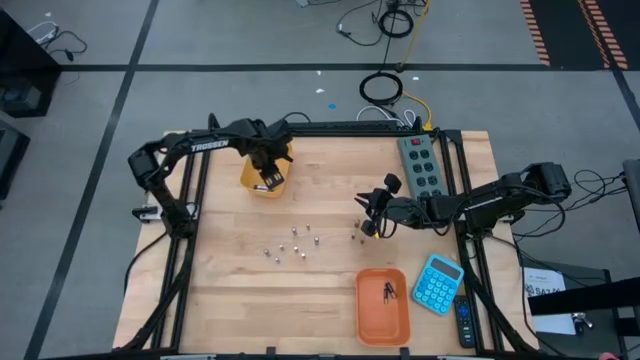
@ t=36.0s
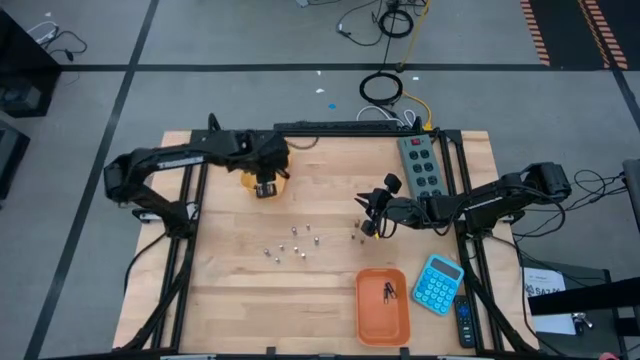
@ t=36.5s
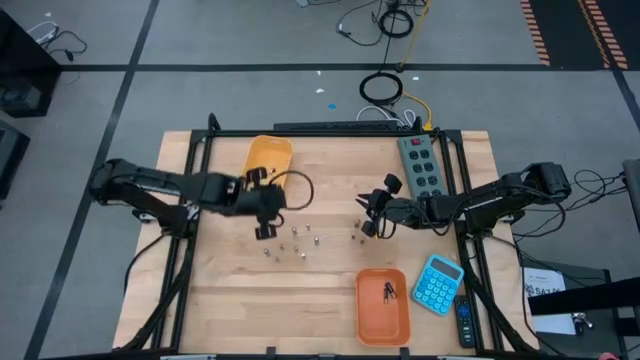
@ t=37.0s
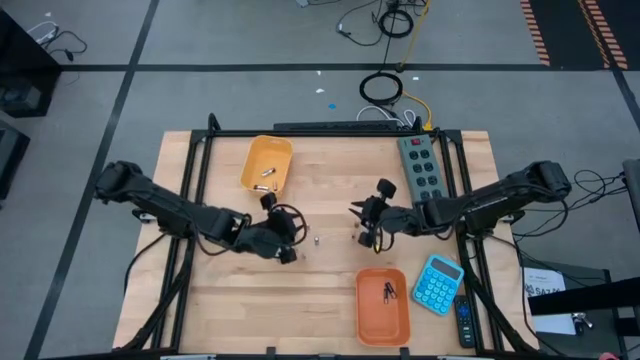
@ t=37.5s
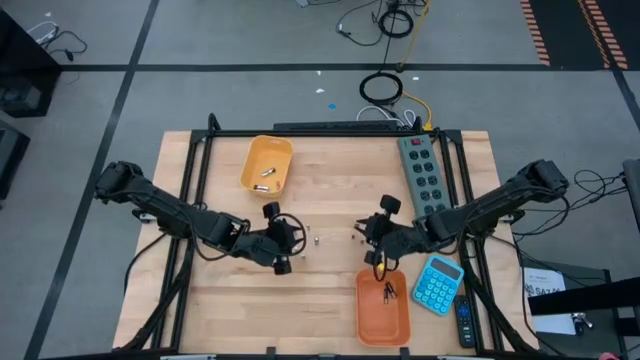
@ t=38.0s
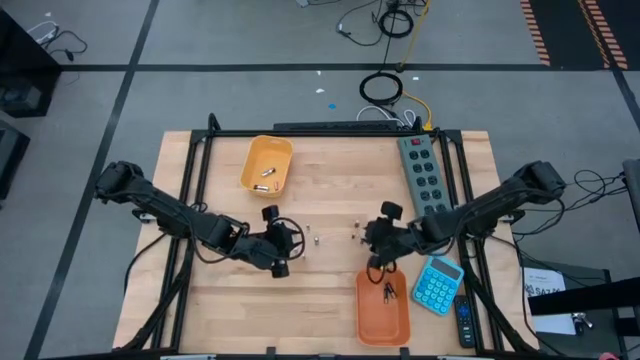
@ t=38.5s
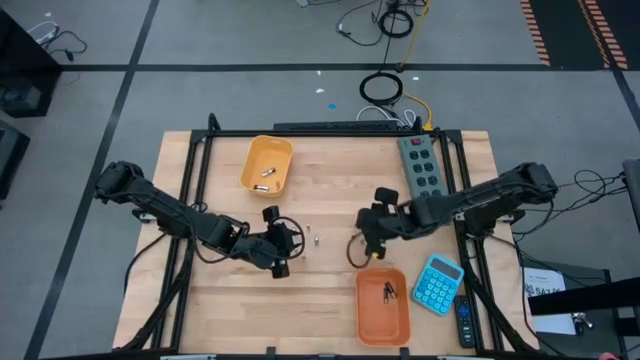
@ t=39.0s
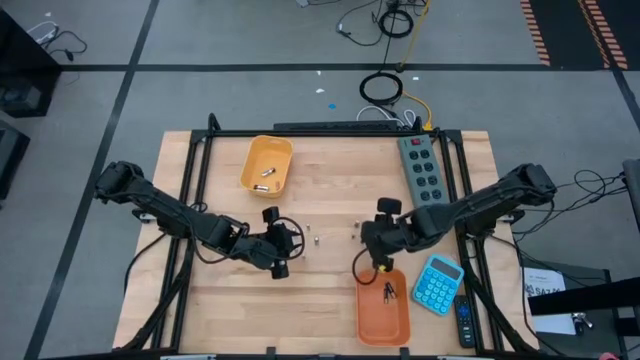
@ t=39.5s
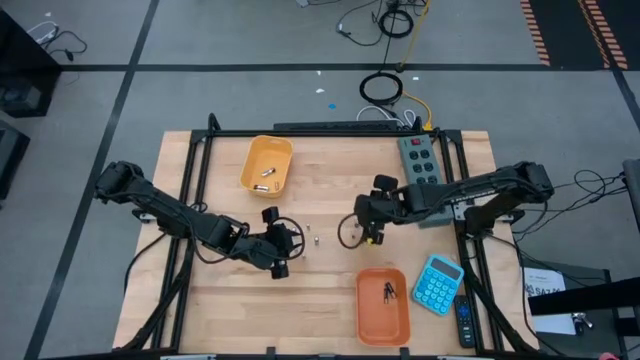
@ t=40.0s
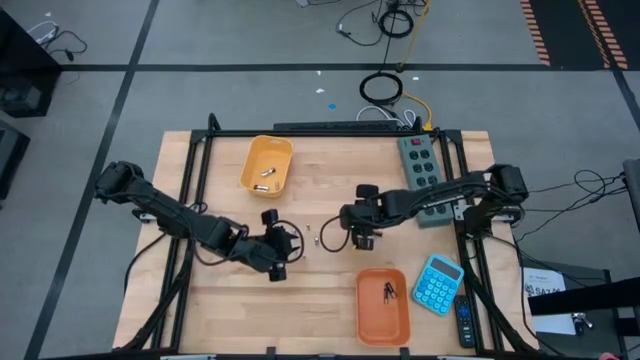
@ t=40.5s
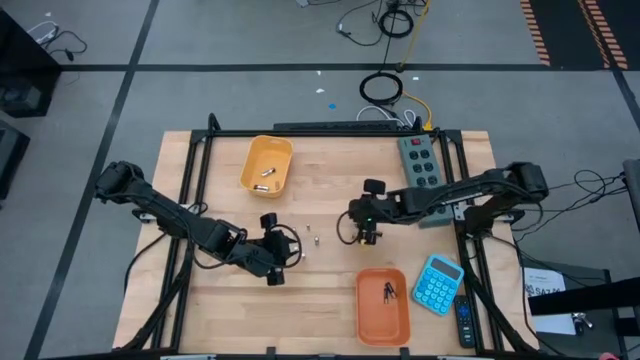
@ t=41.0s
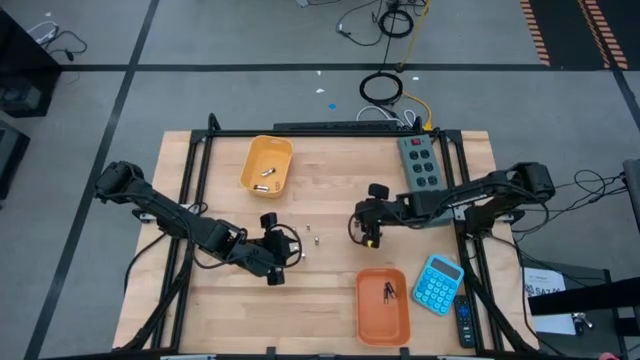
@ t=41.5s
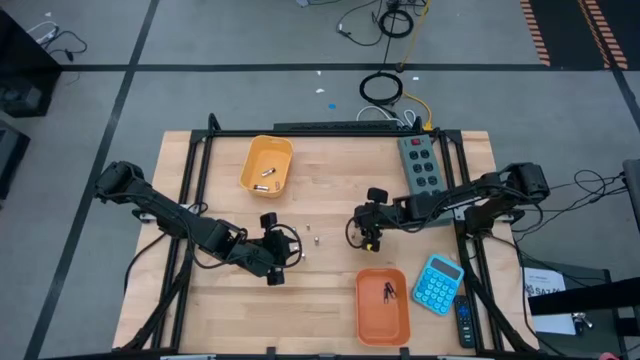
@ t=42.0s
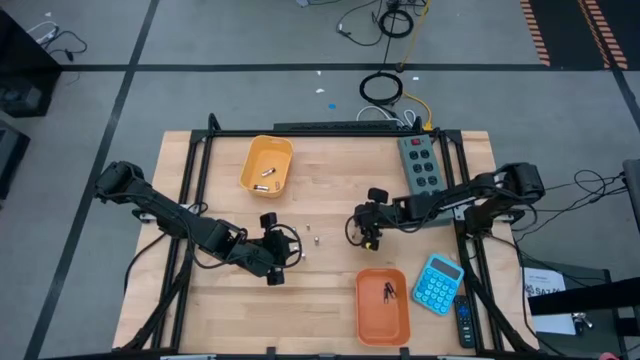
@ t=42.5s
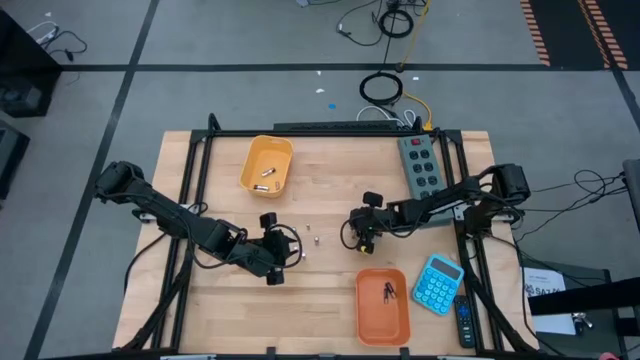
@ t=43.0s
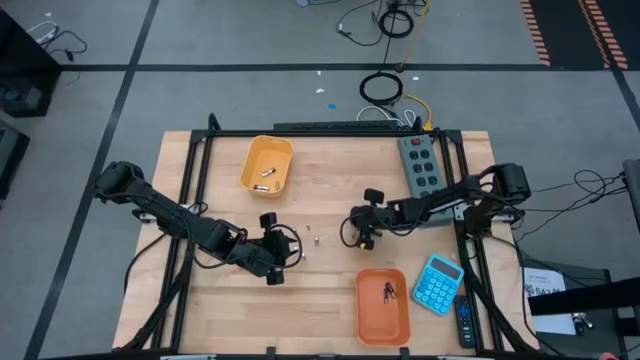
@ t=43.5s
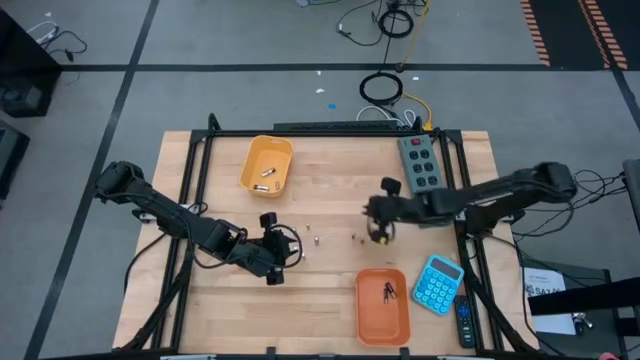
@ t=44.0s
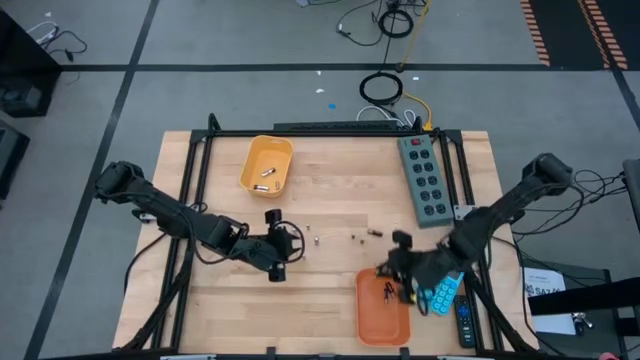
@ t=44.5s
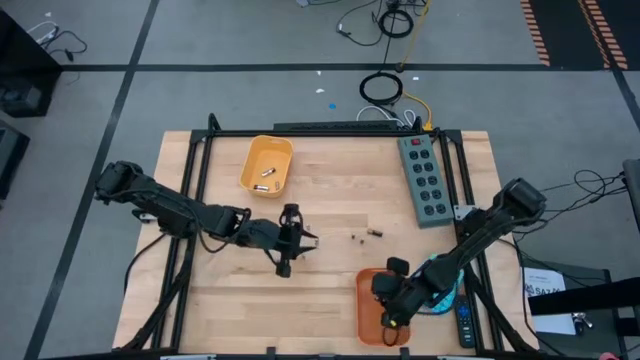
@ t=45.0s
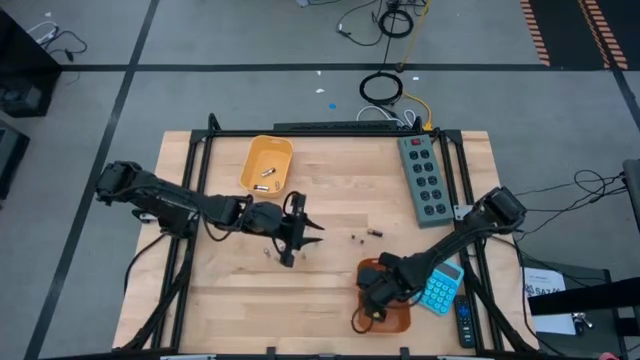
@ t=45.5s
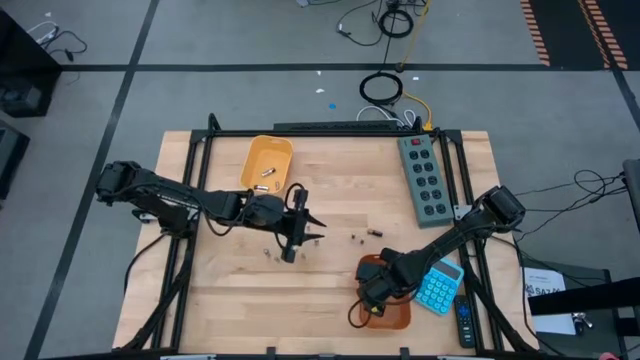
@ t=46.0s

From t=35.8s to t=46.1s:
Task: Sort batteries
Put the black battery into the orange bin

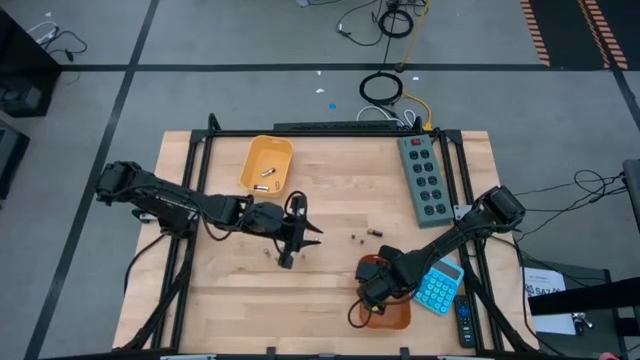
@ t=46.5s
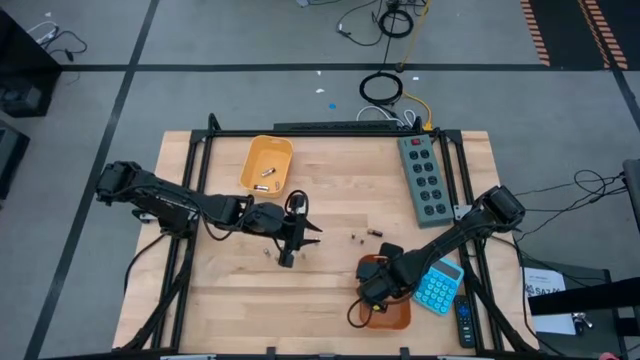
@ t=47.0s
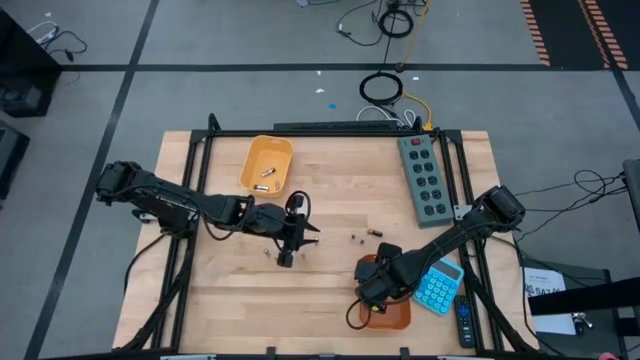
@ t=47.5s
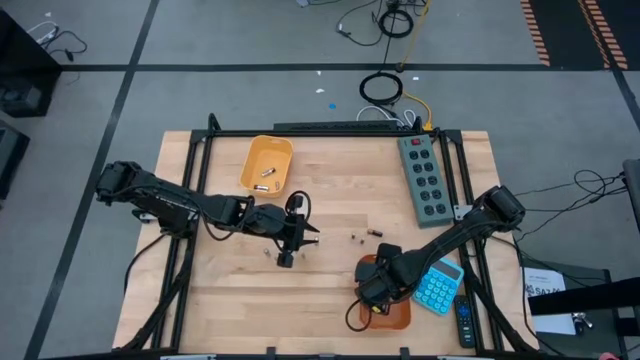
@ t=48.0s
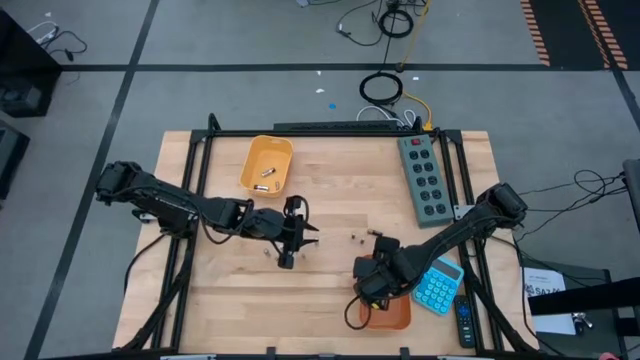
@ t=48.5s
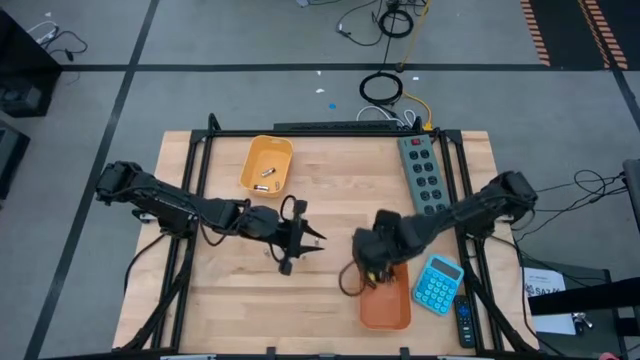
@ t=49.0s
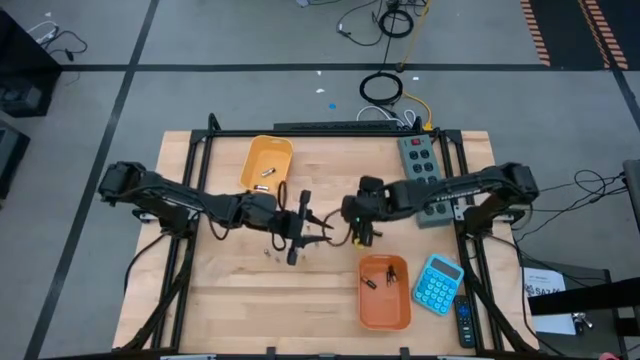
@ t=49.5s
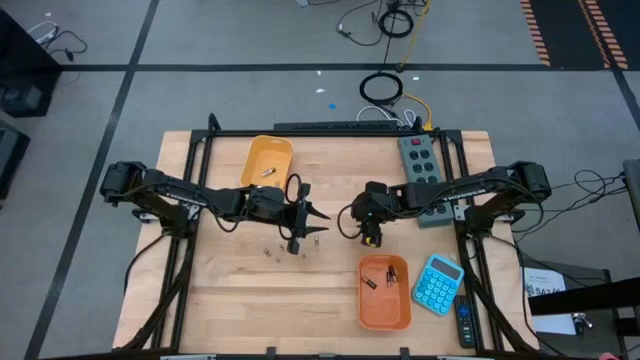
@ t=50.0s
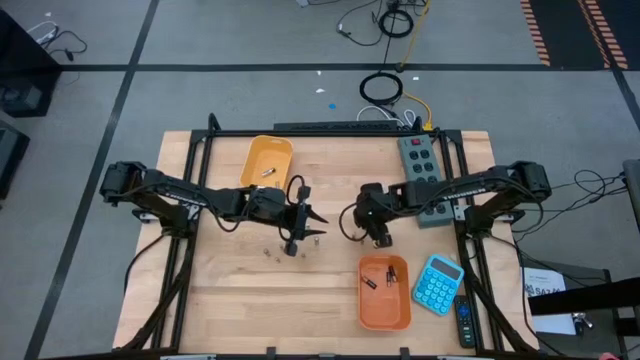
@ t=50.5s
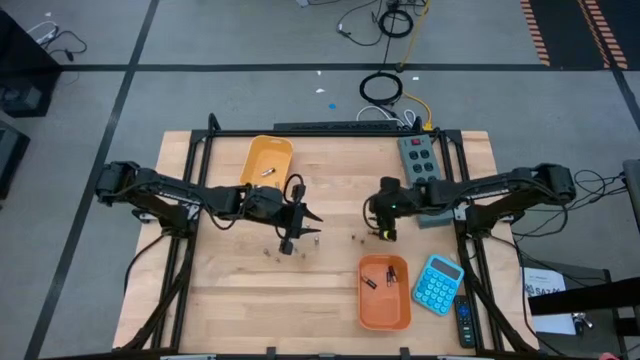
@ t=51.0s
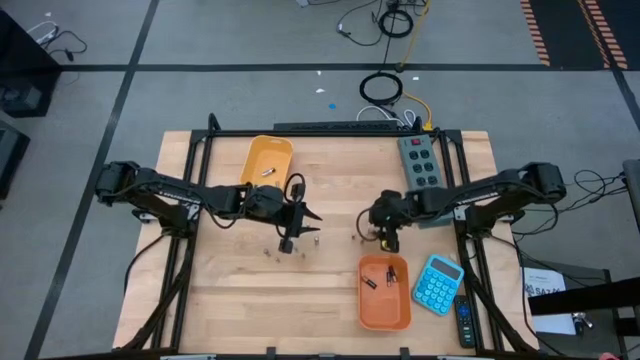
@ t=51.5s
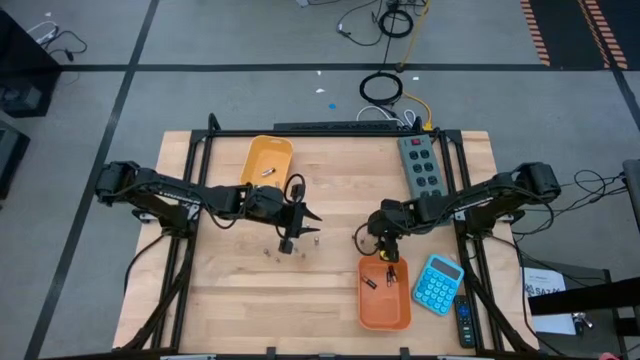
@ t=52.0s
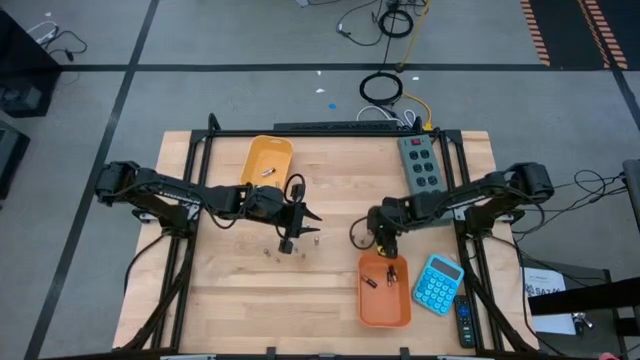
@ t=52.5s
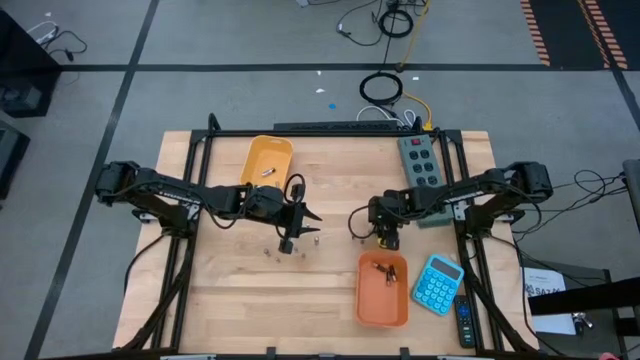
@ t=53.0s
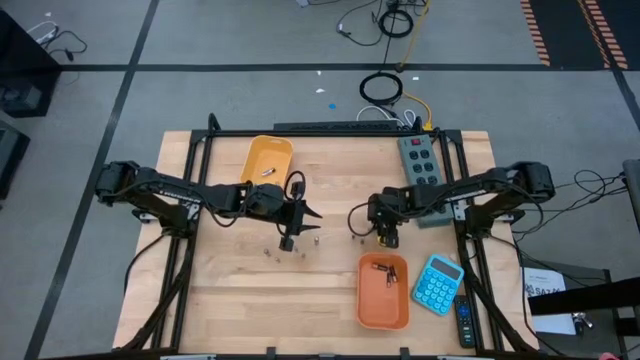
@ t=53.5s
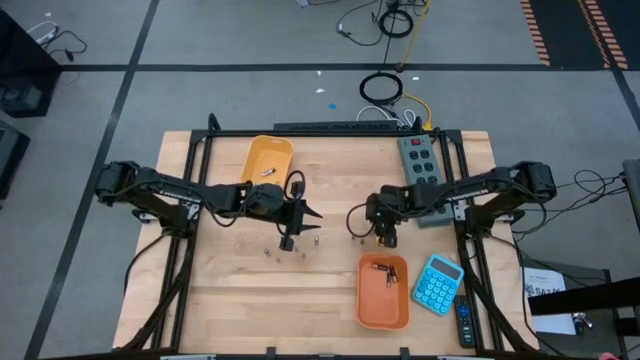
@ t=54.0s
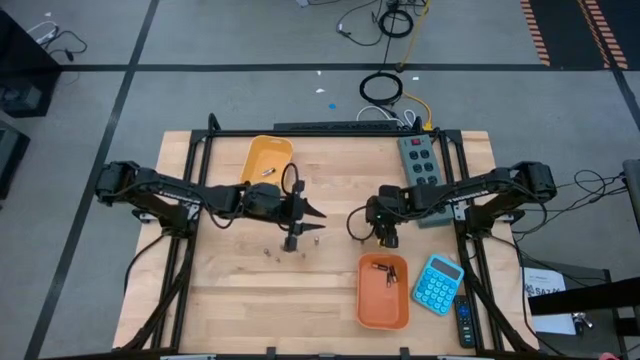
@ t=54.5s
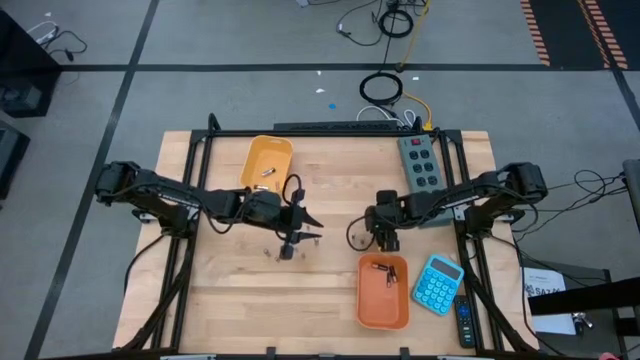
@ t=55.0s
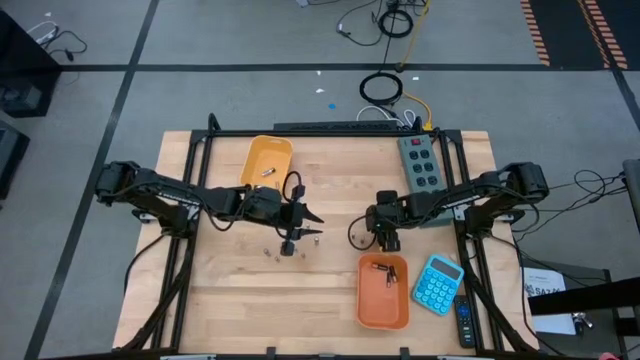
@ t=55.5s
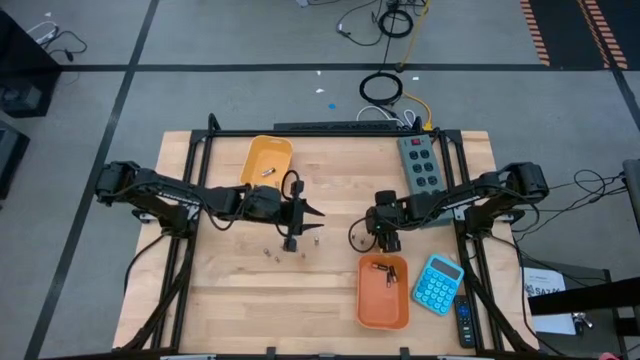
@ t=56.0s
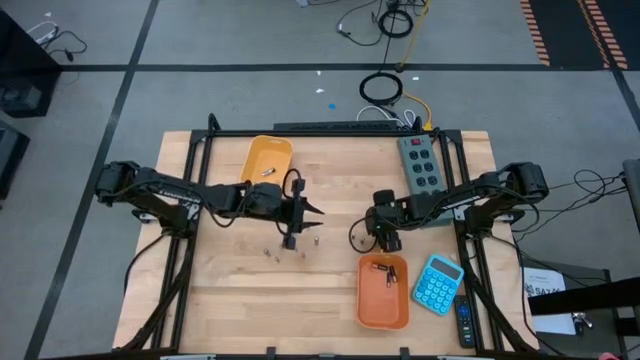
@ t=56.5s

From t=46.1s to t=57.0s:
Put the black battery into the orange bin
